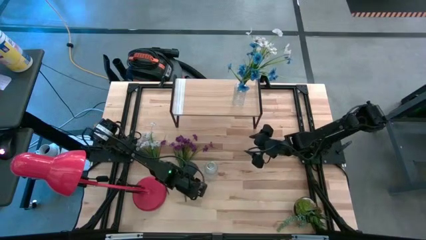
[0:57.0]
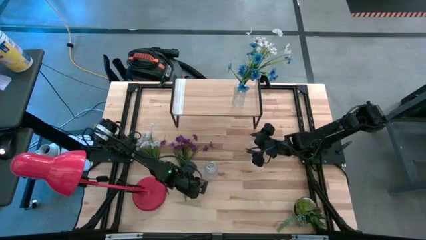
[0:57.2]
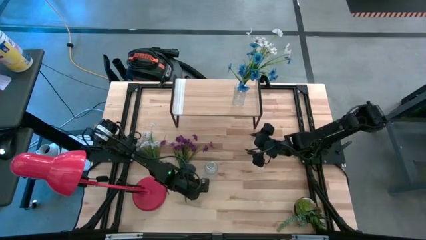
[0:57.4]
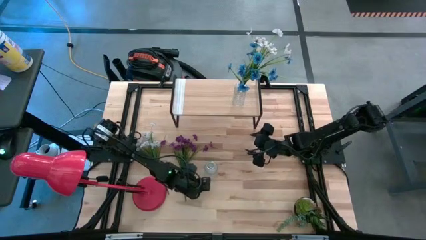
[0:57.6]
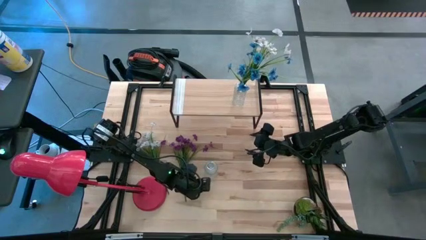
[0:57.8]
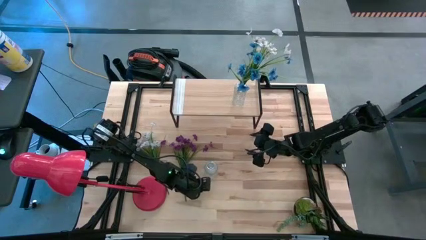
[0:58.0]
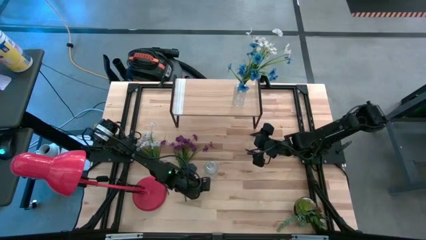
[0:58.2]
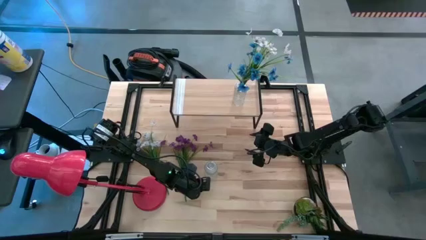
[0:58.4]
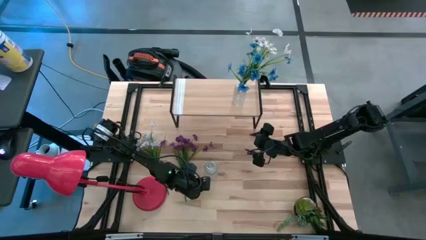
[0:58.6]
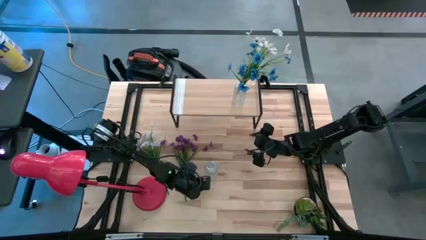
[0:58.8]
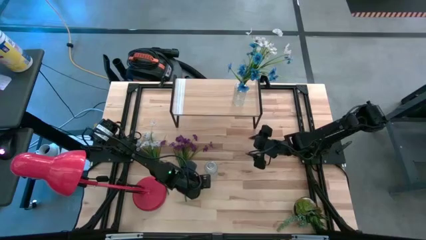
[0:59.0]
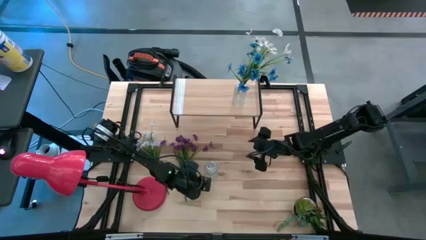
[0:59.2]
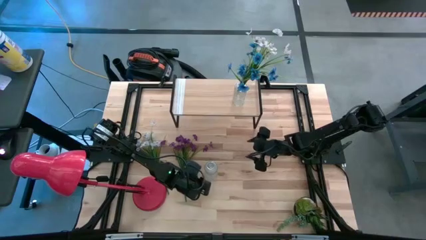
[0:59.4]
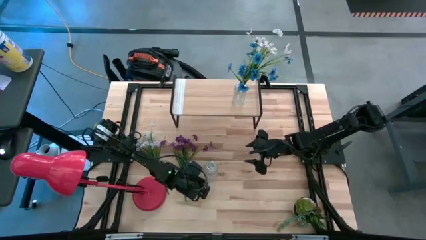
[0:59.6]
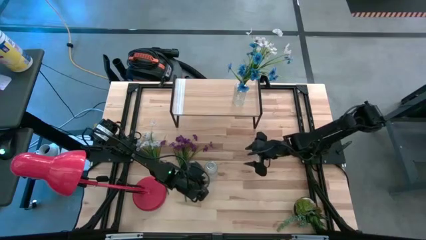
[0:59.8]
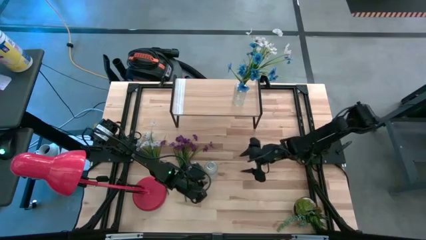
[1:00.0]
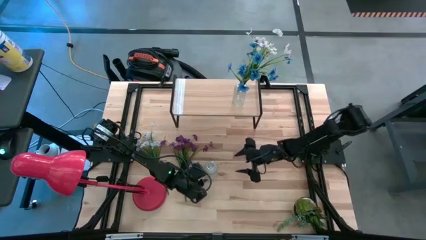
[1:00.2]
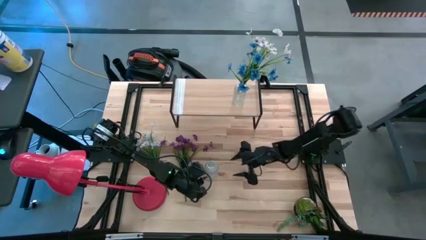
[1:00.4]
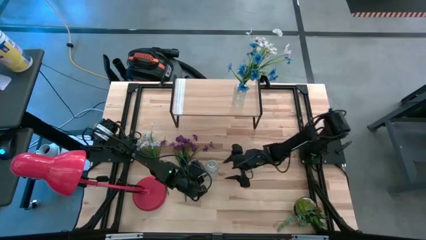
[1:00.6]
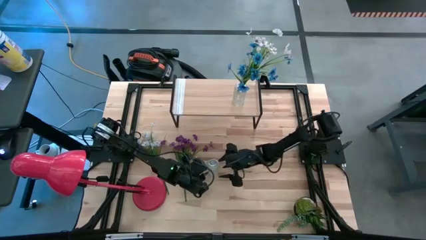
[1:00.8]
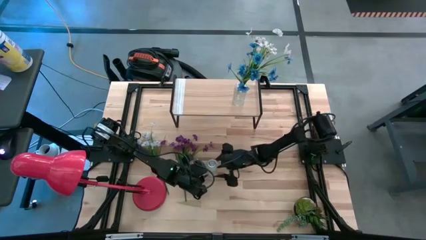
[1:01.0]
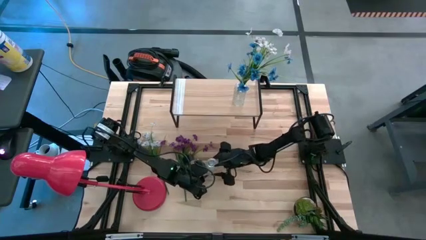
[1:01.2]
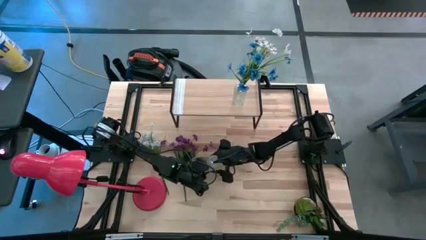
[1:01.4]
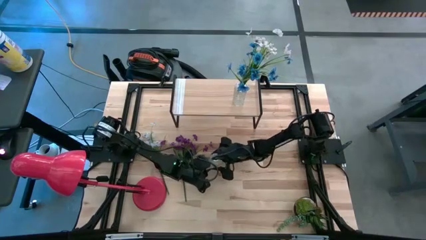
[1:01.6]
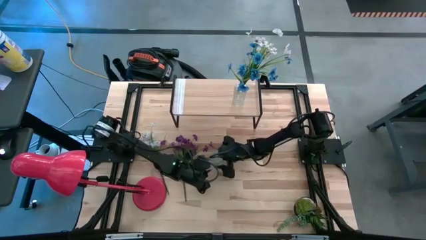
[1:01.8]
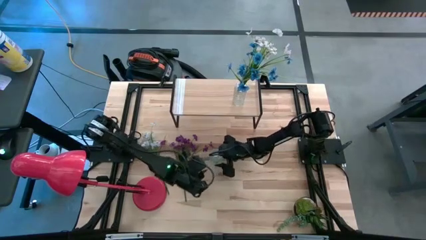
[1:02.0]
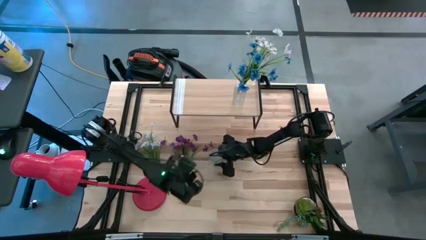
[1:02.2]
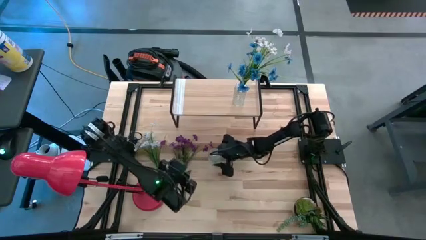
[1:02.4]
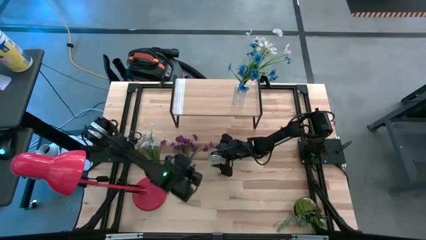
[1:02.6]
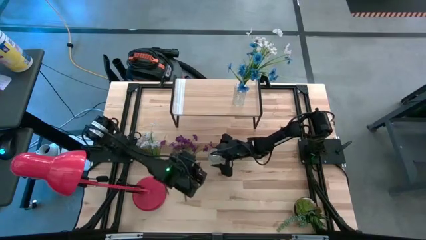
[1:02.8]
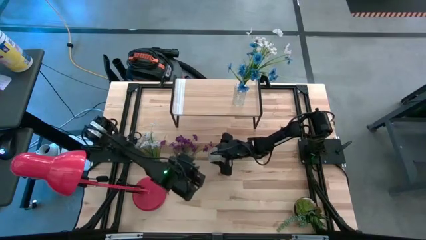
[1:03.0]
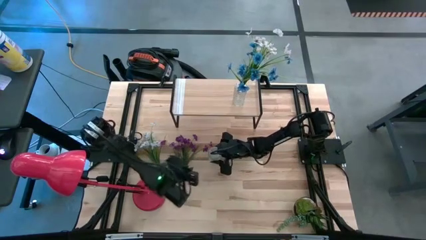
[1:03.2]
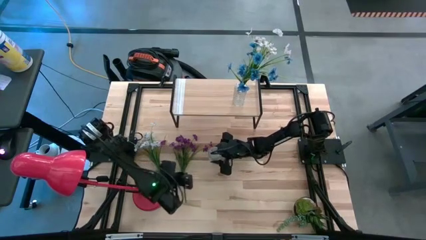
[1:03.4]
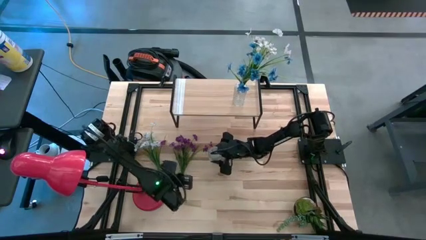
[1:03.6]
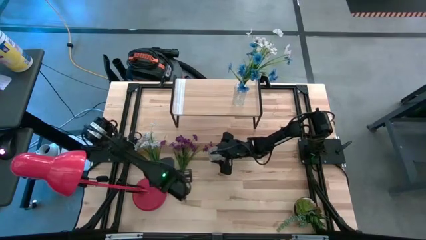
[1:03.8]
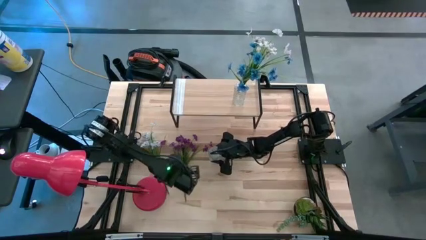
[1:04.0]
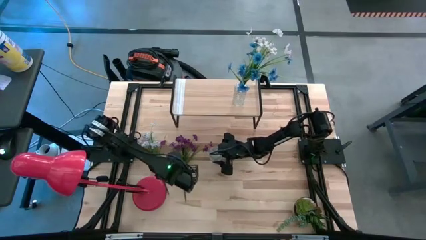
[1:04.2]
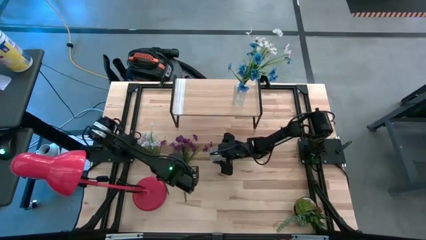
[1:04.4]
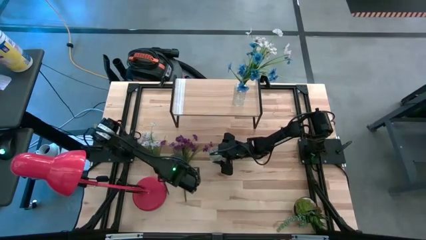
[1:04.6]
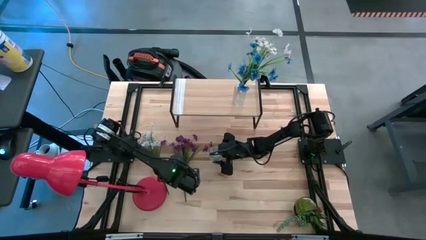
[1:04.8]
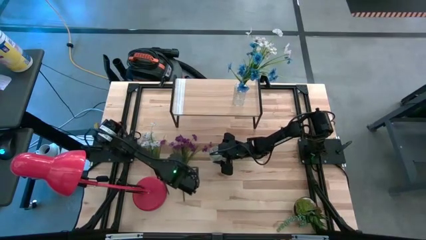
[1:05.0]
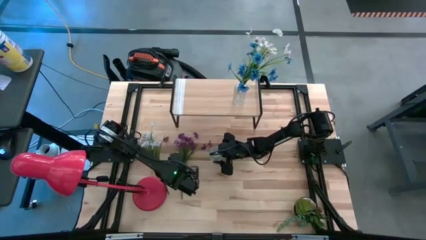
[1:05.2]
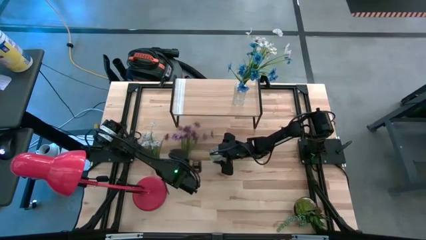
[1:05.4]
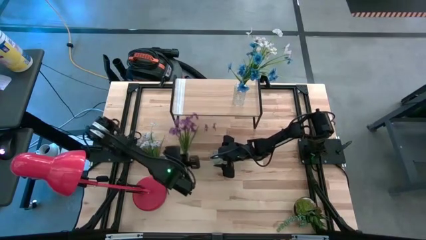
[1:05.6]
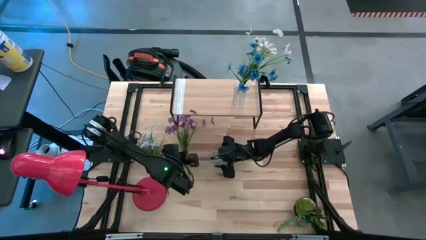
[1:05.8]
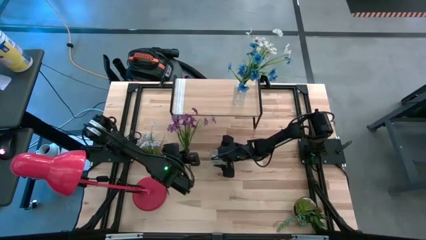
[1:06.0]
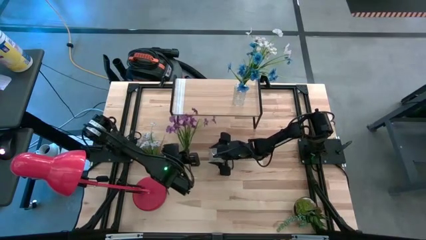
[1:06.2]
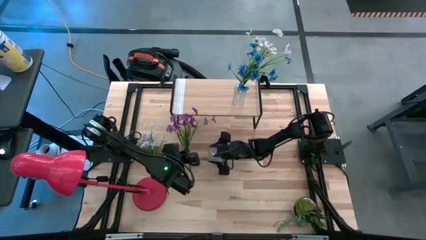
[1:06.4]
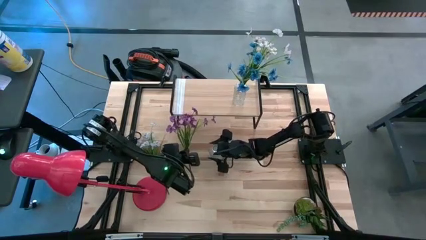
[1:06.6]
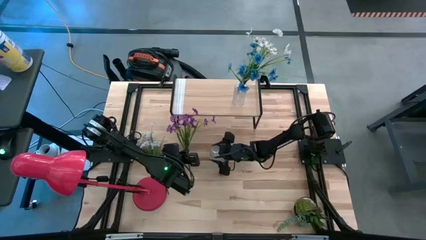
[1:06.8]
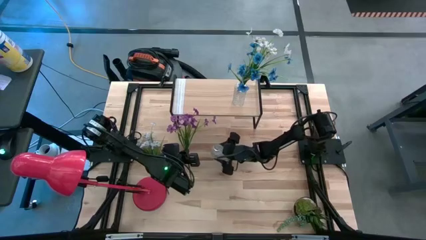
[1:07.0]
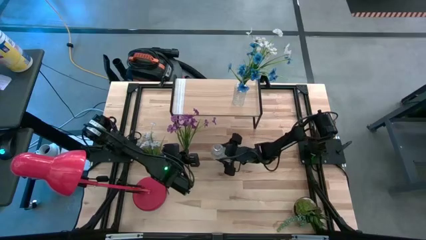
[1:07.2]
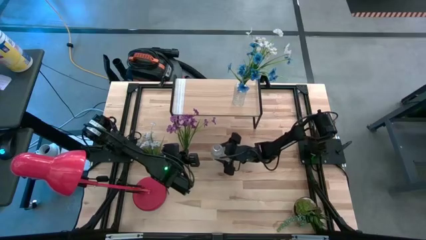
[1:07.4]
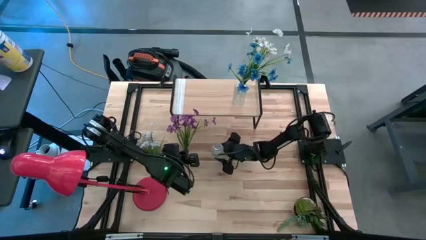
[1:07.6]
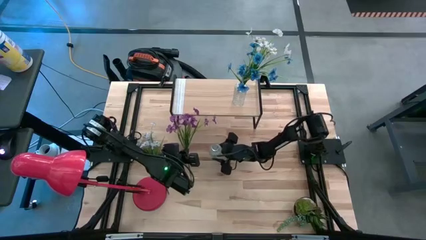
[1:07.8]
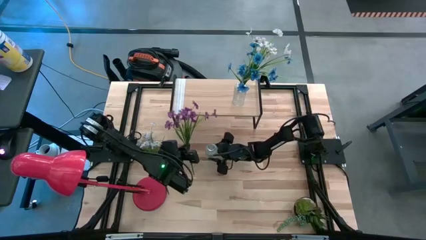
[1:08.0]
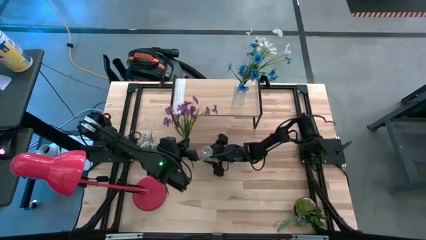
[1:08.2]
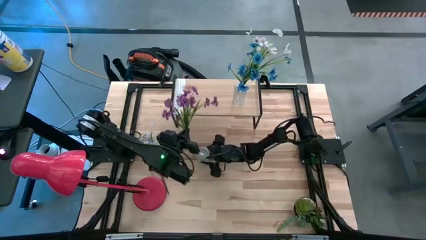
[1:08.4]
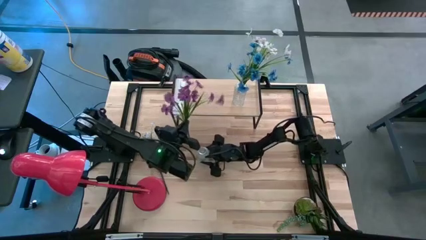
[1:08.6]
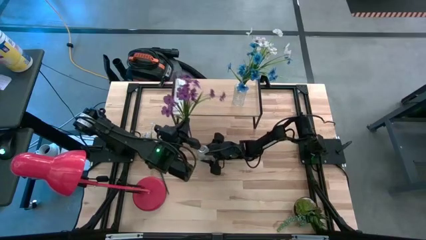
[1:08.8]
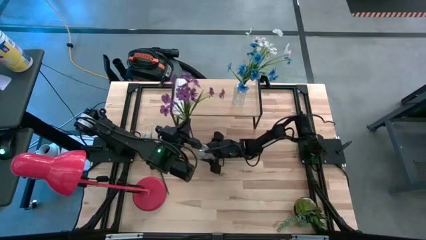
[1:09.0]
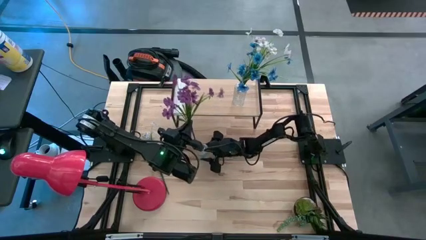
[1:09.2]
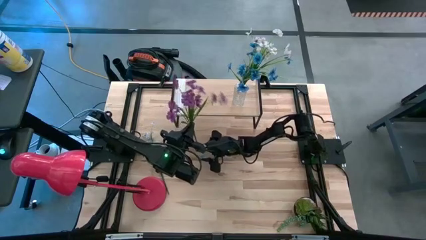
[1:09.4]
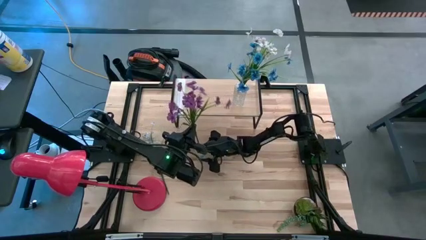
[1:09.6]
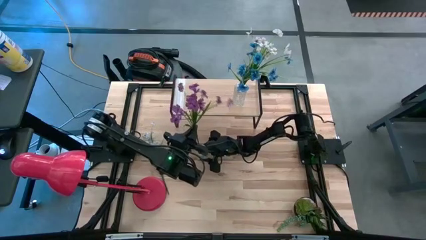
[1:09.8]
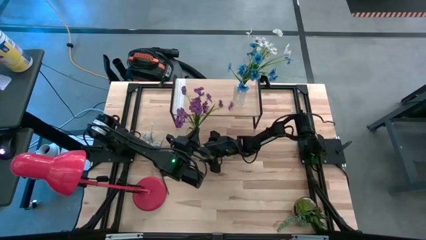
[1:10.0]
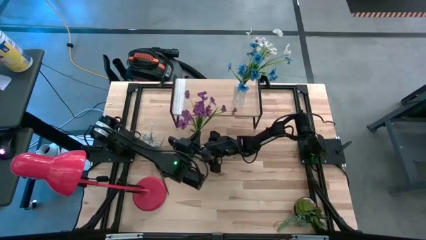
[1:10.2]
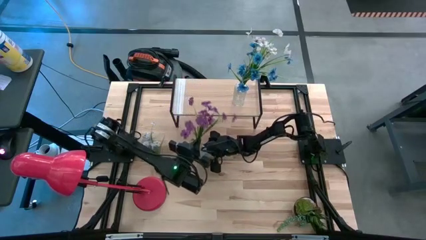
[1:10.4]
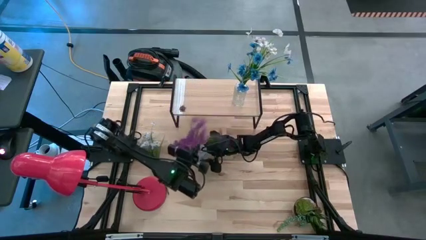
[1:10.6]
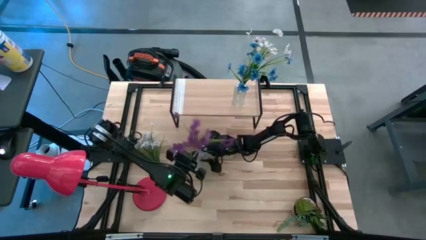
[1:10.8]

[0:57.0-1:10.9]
Task: Pick and place flowers into a vace then onto a shelf
Put the violet flowers into the transparent vase

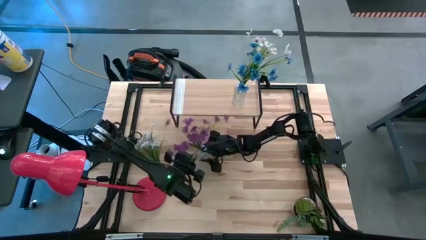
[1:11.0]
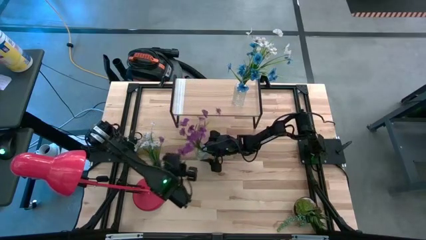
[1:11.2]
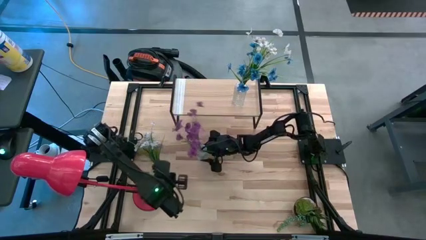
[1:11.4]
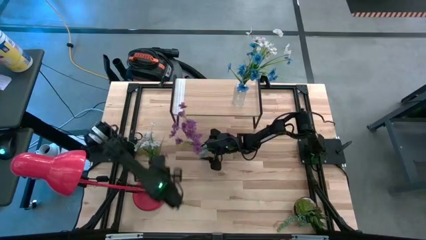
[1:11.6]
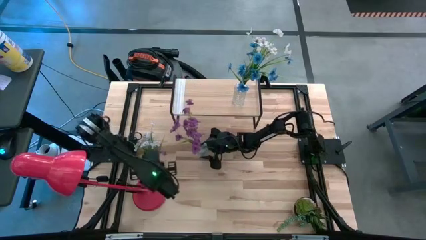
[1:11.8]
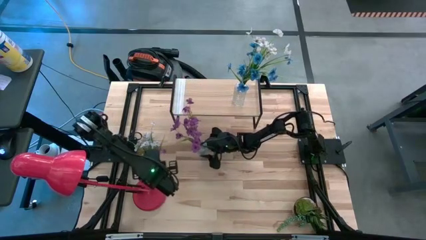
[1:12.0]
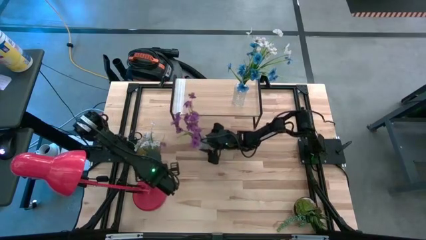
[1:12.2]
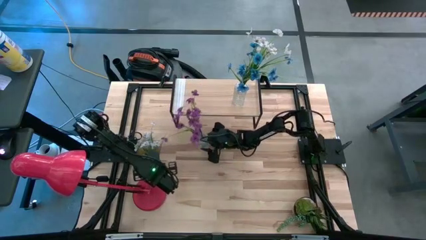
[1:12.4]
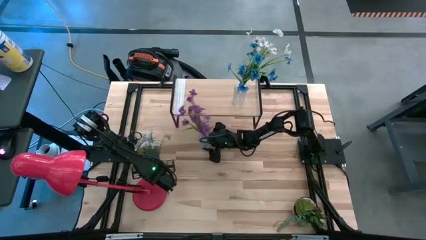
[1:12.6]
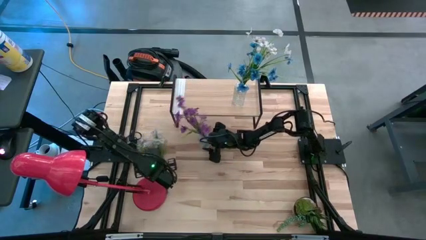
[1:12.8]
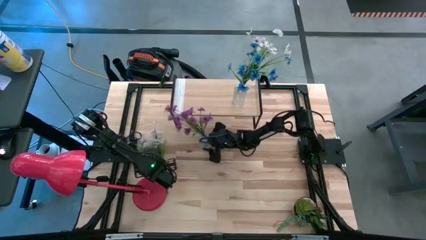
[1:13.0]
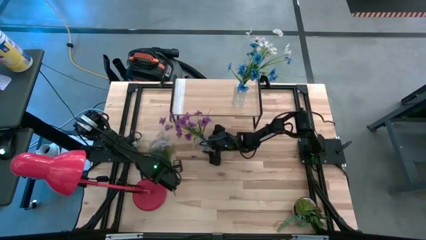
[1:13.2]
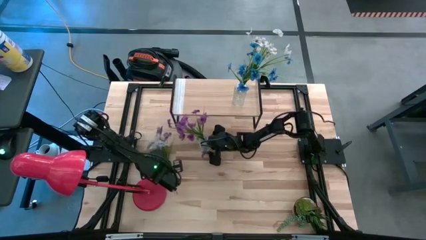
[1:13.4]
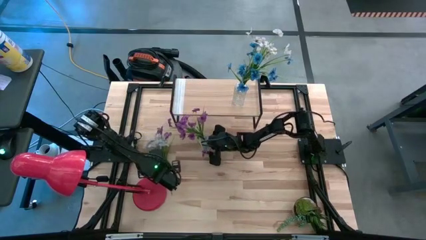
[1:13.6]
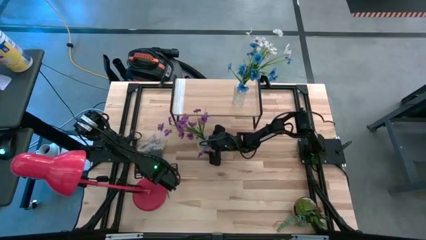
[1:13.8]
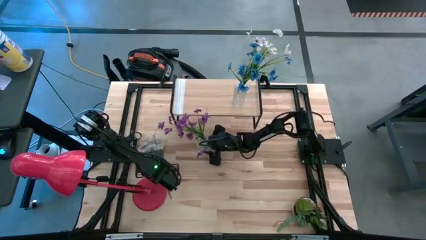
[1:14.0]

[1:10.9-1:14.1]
Put the white flowers into the transparent vase
